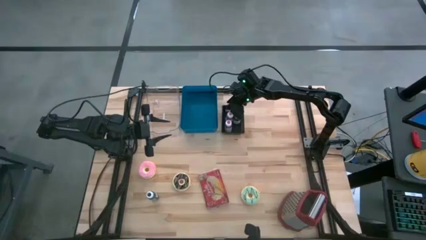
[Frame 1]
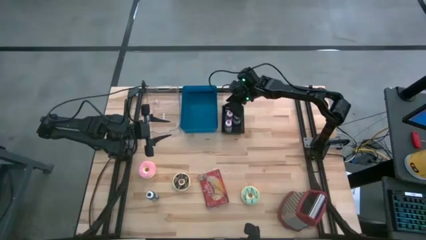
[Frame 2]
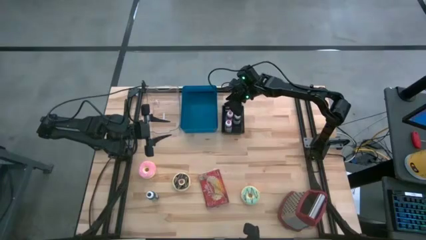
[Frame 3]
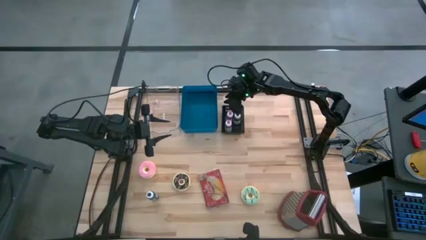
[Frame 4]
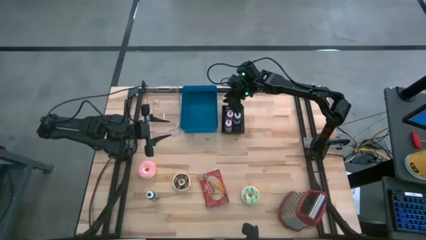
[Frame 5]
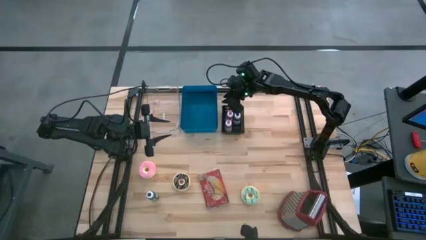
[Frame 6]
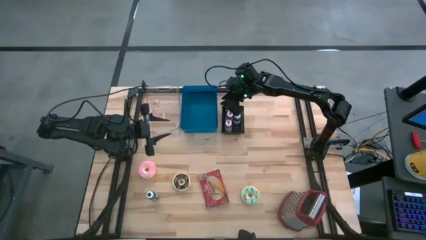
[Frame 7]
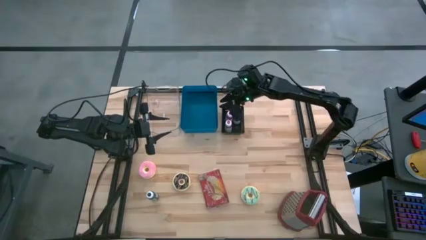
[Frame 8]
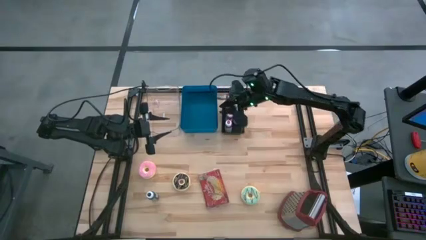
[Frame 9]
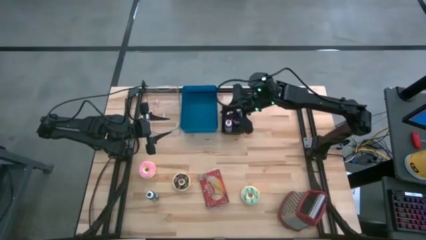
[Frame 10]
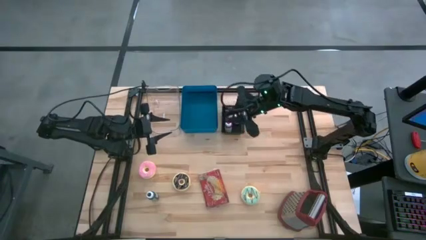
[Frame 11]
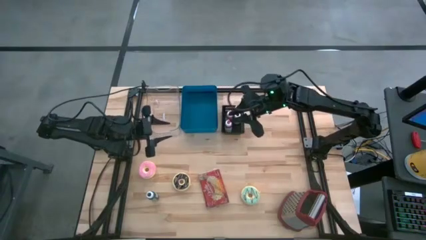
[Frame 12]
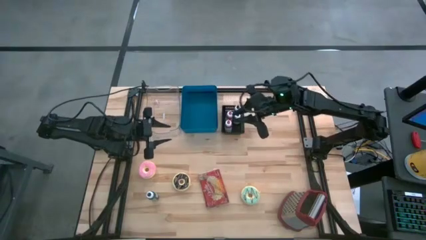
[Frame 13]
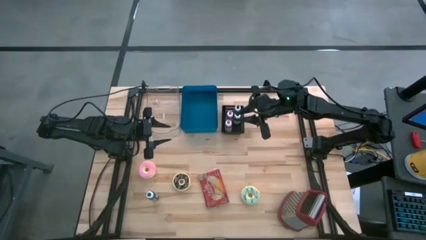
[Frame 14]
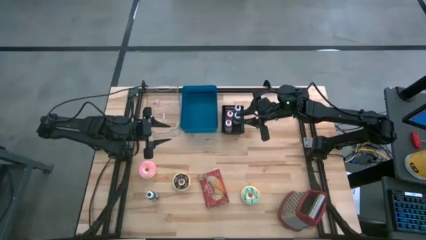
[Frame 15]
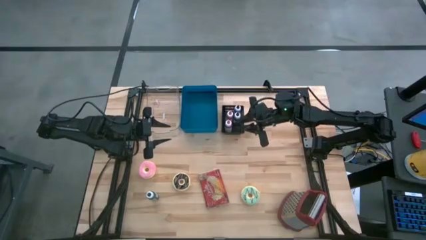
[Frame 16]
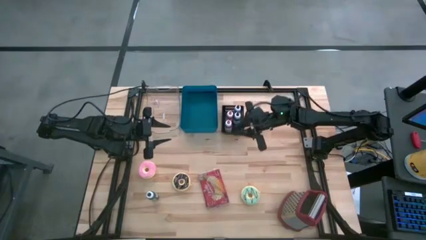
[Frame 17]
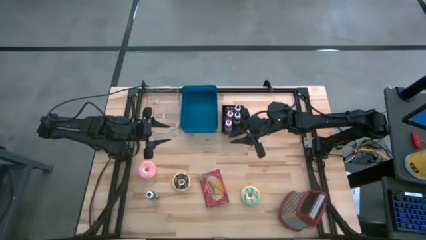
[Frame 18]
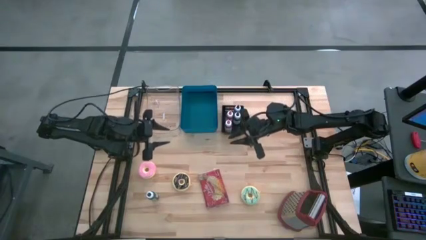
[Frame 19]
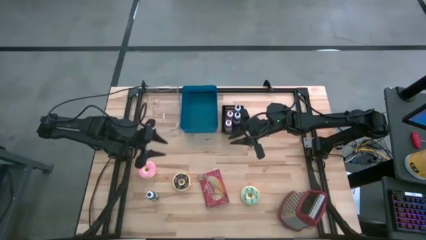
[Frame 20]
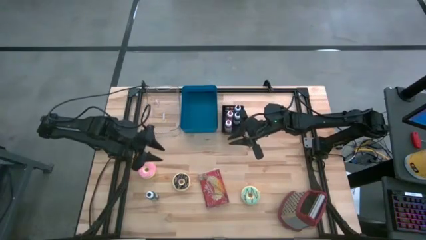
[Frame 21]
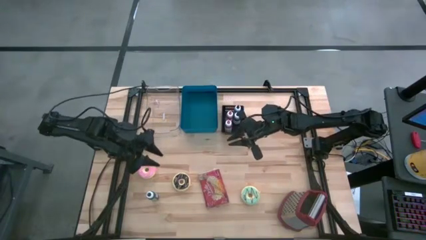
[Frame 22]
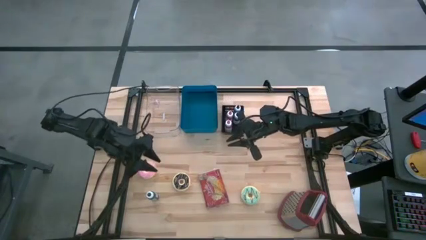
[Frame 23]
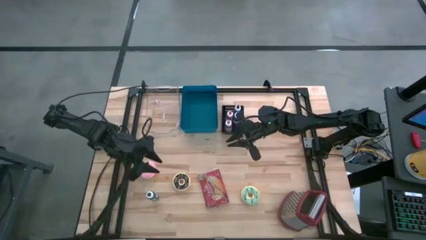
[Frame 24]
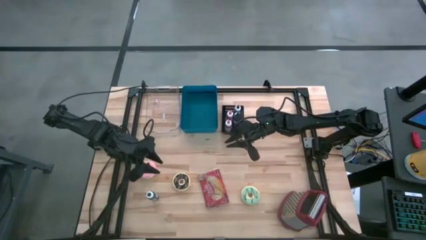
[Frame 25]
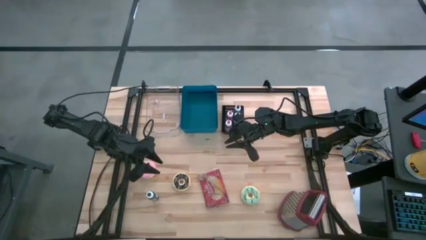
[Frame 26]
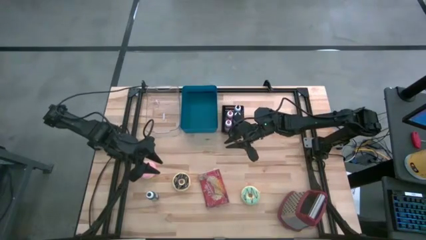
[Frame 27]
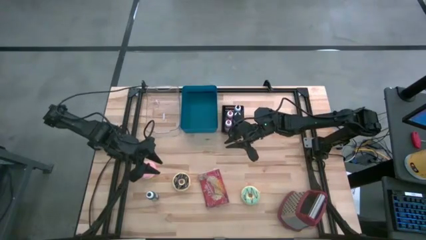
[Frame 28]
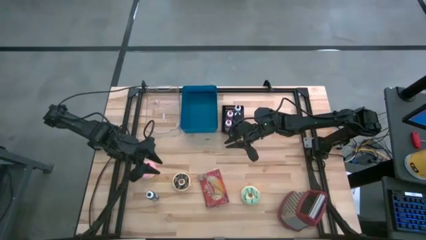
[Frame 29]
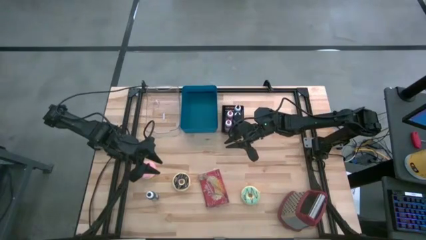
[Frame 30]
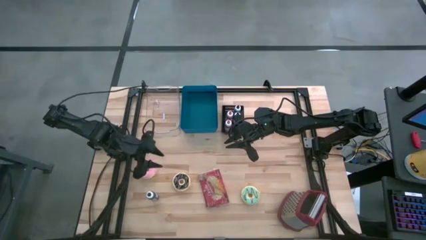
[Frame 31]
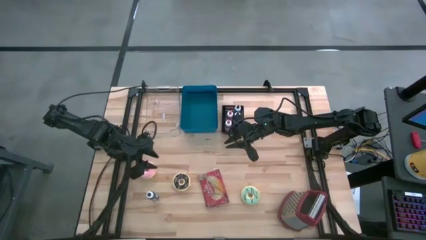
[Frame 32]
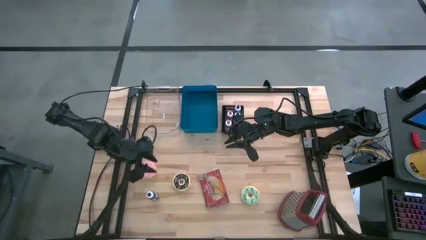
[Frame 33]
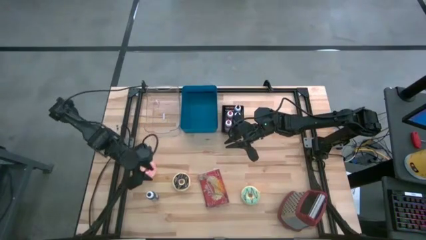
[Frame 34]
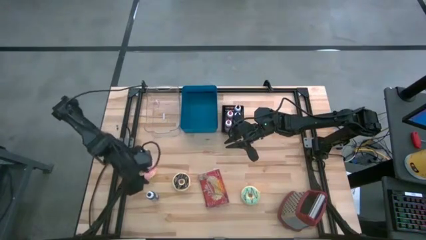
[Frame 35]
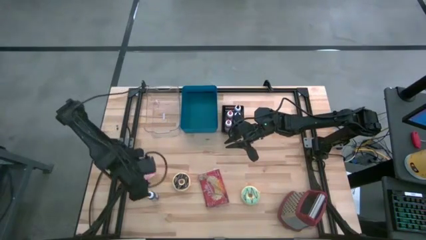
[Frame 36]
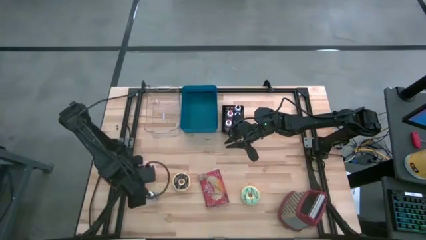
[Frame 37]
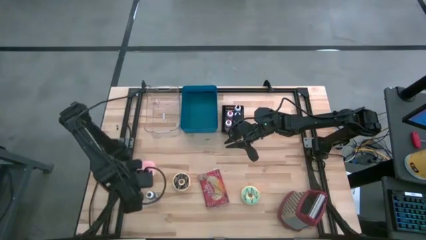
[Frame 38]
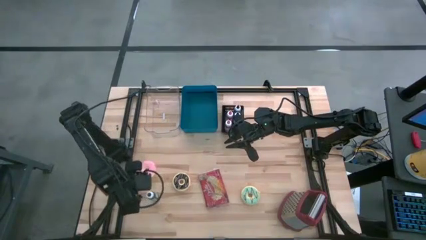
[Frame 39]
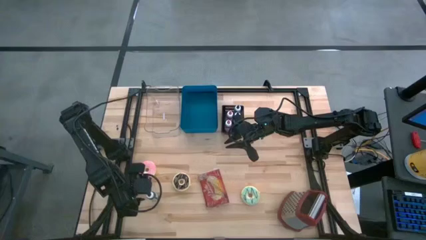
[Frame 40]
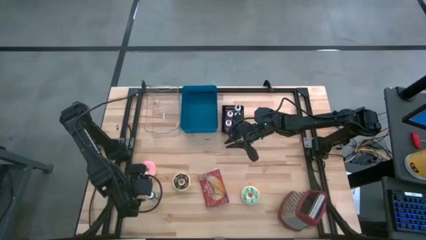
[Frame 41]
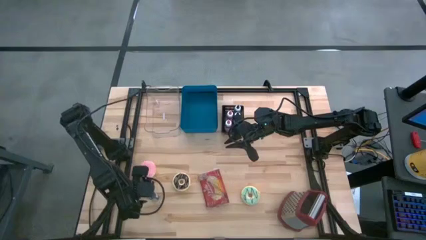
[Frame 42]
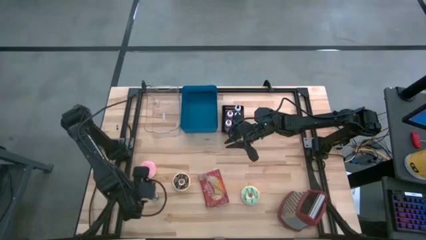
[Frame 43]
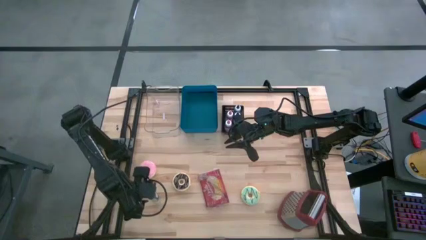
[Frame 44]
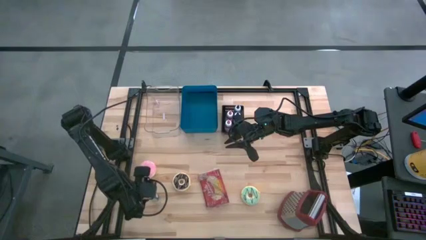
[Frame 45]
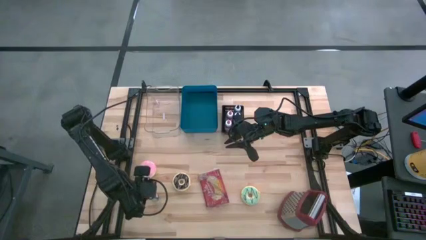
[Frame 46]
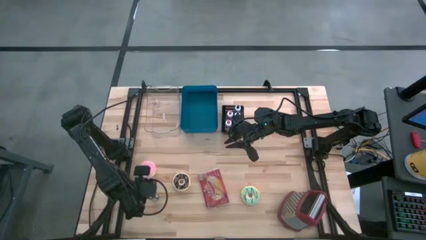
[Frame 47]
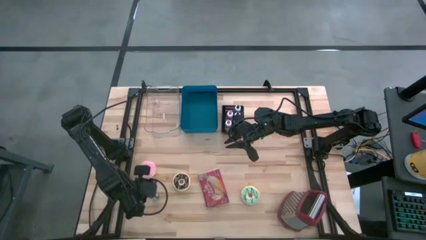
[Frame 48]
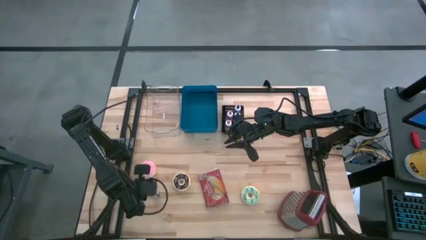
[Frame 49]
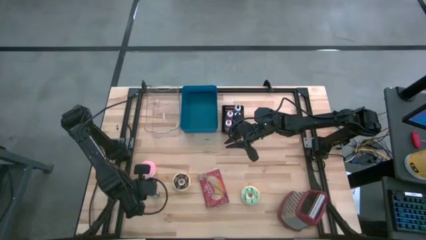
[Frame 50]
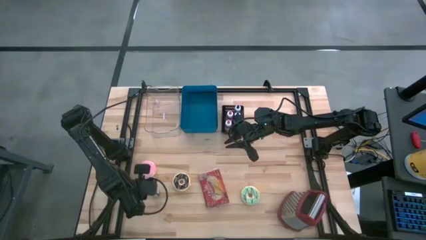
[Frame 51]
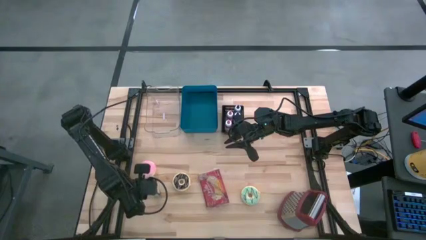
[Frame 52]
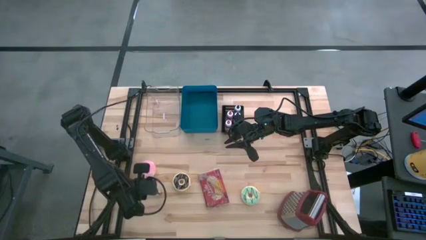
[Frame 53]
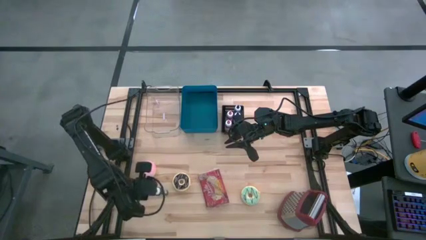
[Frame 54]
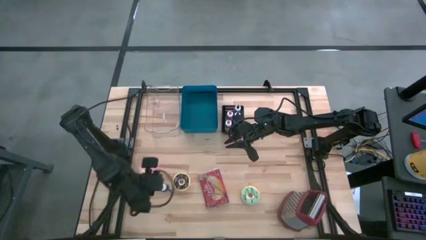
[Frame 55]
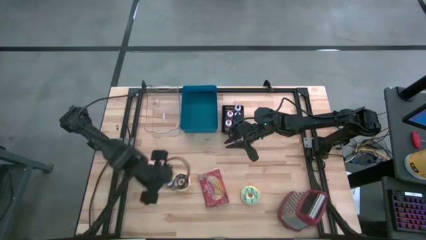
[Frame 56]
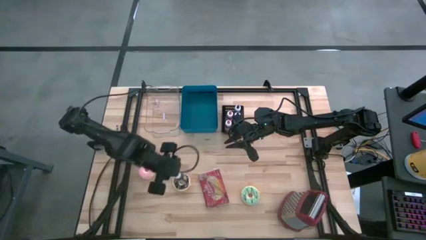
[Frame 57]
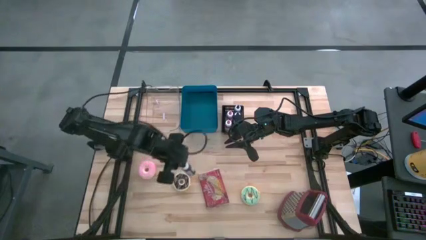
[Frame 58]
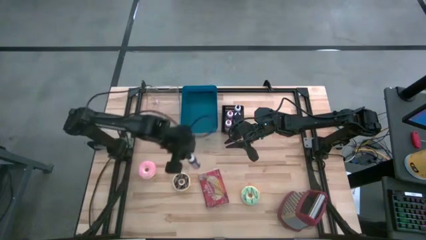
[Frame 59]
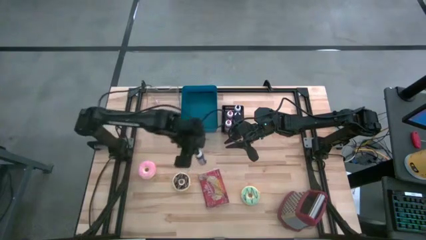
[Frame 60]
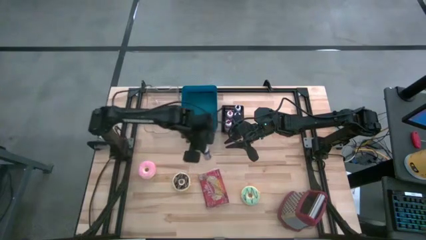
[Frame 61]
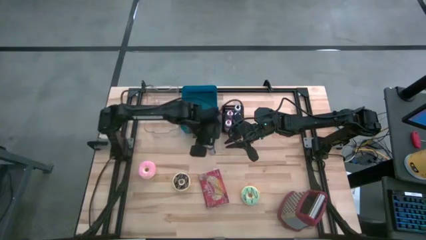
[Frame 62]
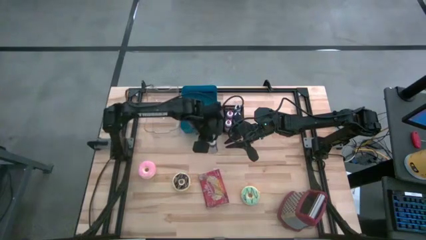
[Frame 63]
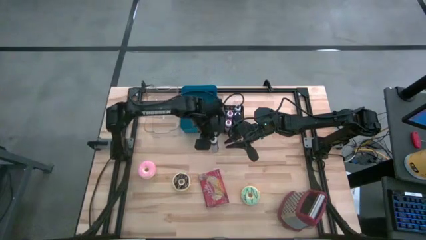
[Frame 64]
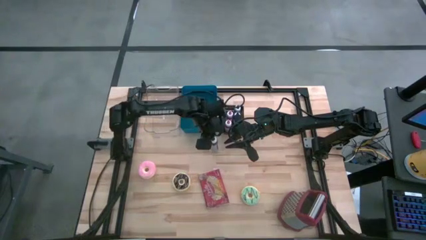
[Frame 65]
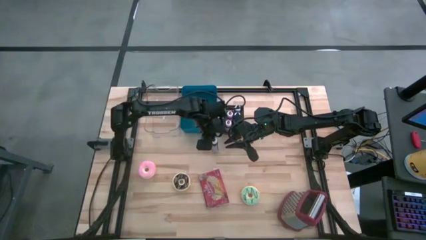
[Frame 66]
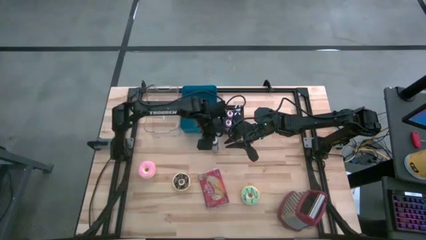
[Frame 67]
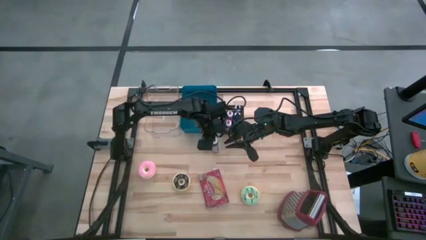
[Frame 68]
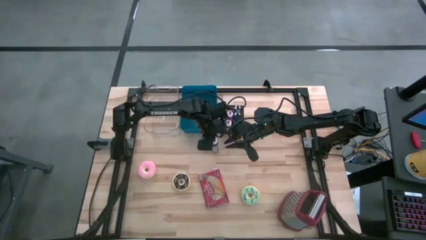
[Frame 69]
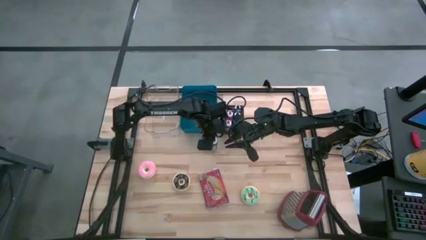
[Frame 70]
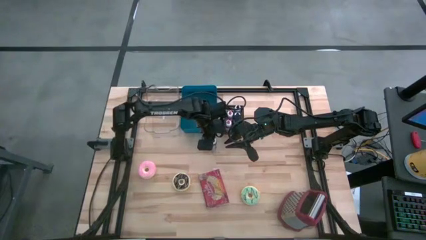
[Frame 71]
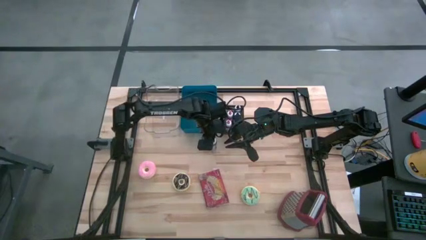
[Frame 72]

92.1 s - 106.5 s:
Put the black food coloring into the black bin
